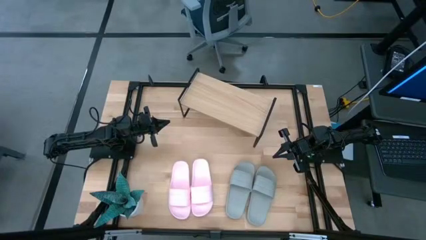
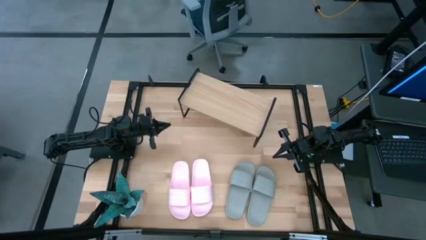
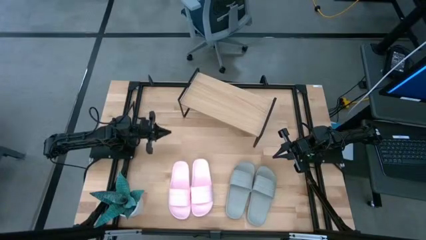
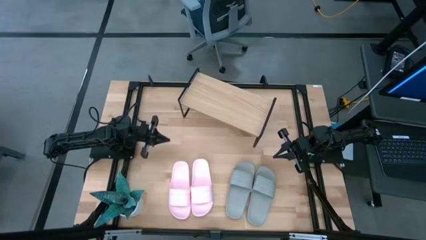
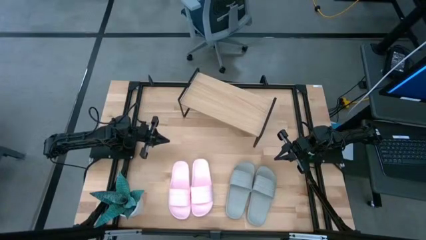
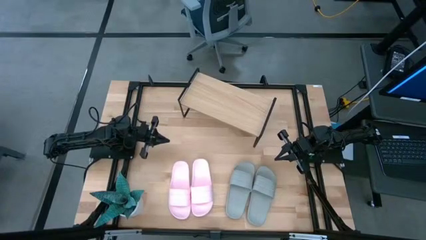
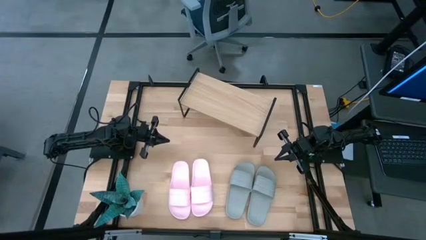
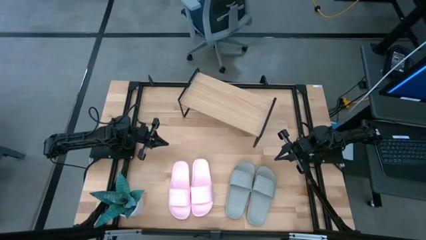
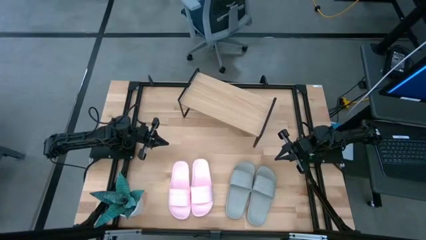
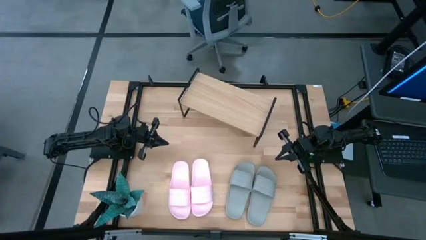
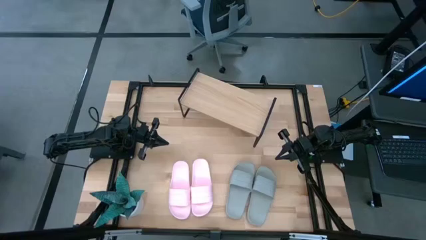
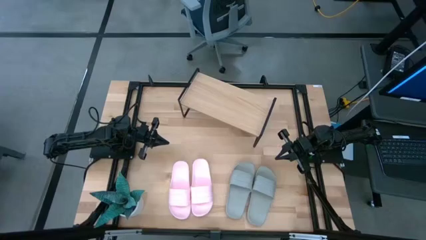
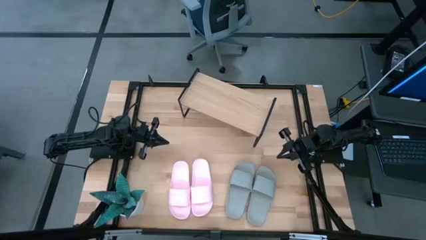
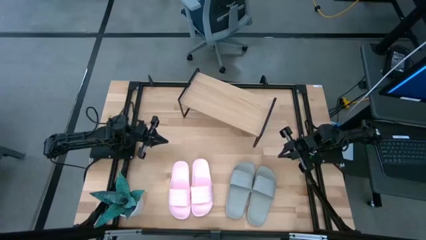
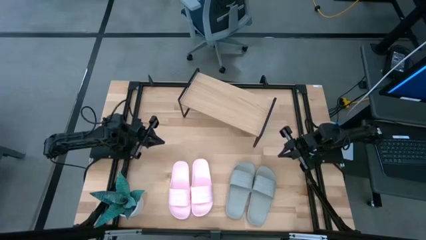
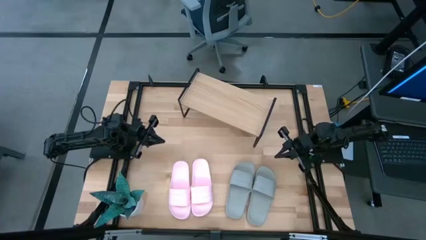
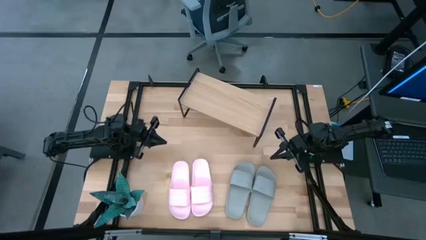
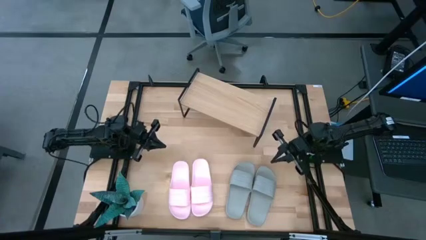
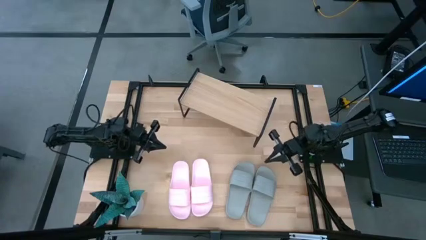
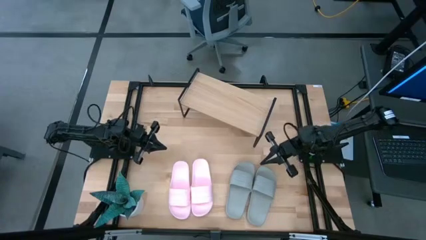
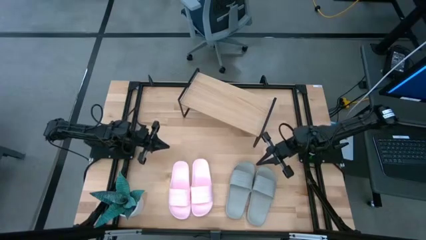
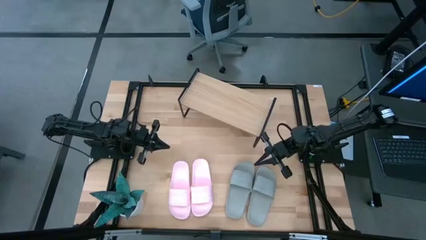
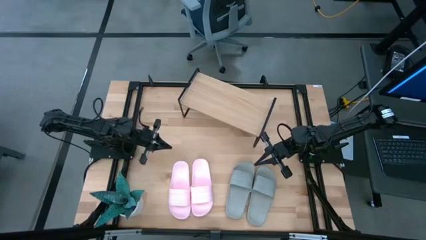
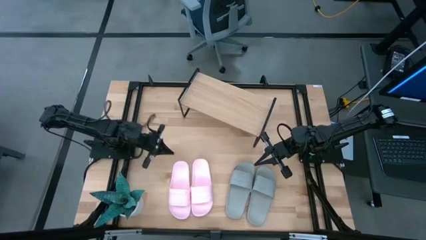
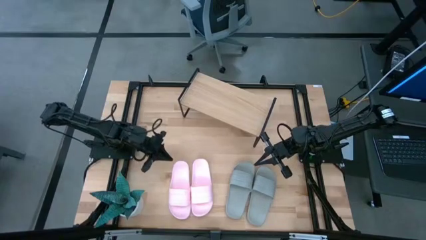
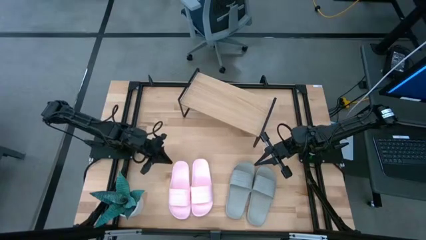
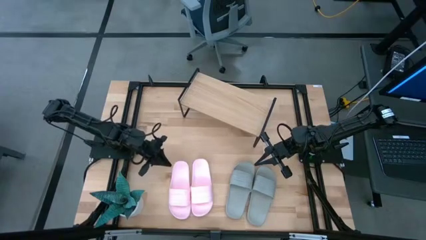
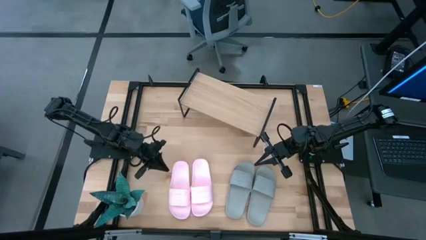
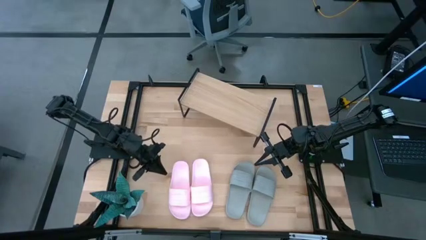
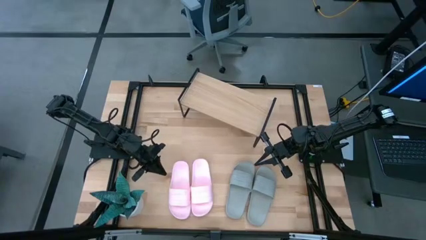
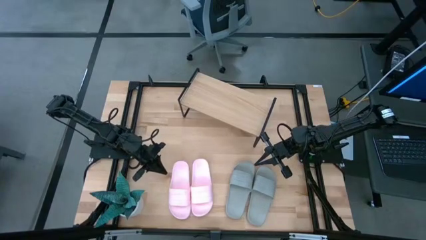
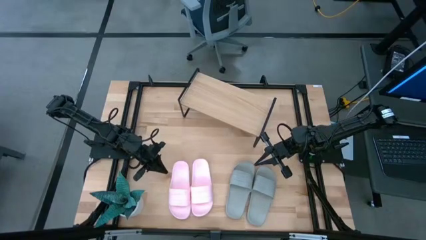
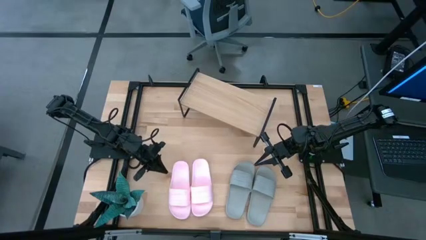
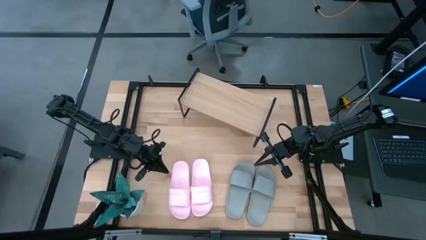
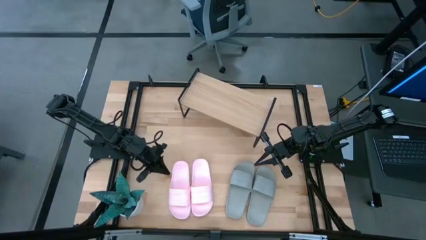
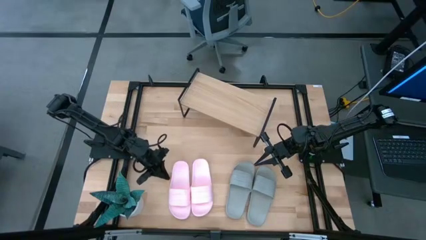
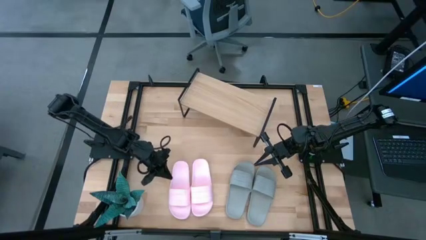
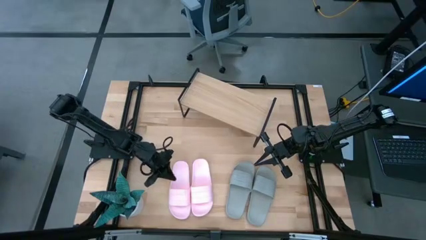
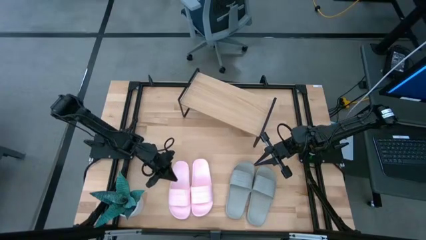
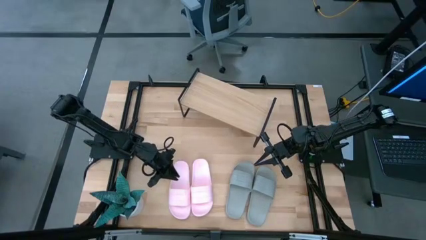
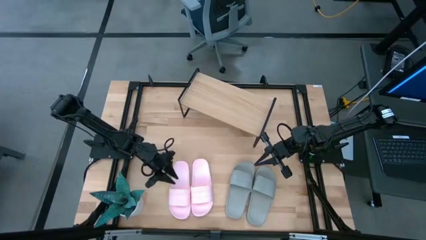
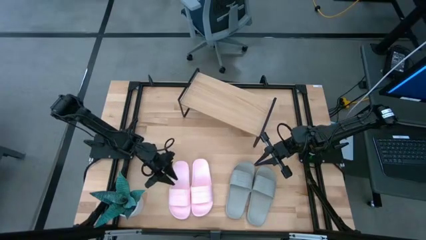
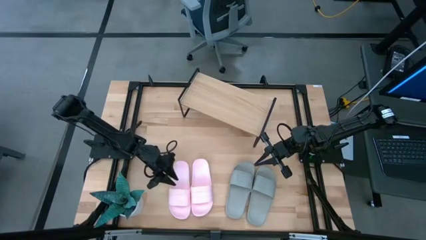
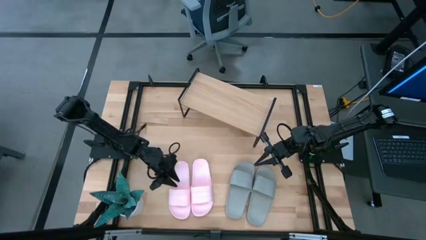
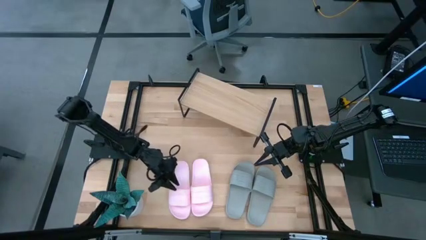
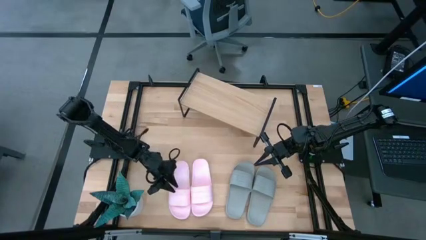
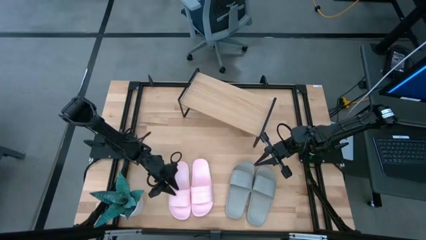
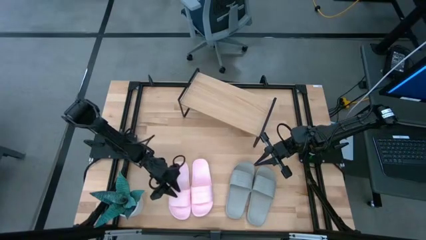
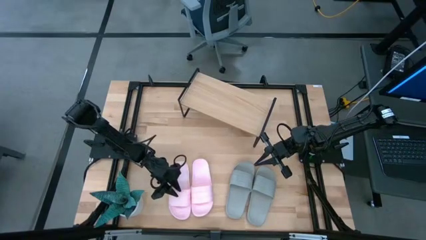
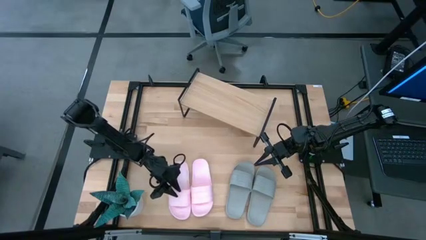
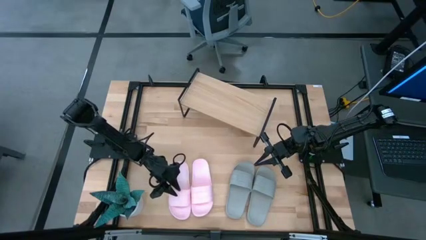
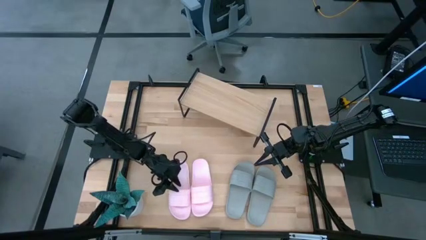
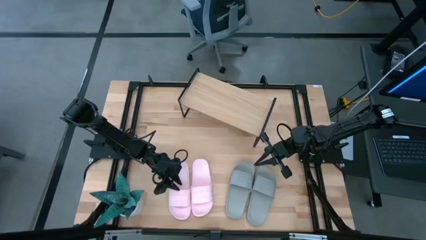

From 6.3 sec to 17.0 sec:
Task: Pick and place slides into the shelf
Put the left pink slide on the shelf
